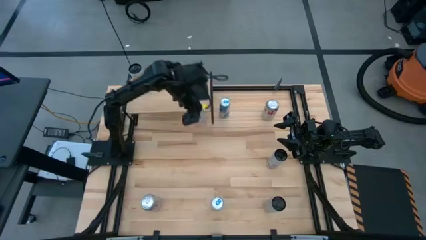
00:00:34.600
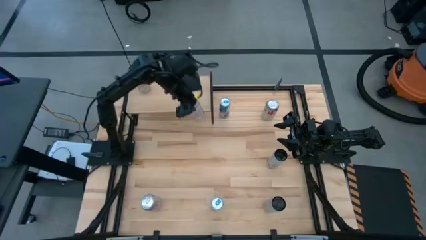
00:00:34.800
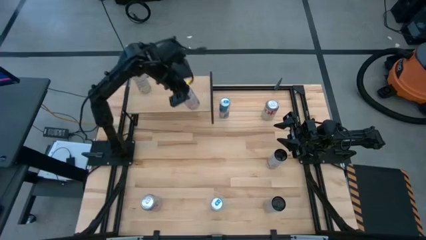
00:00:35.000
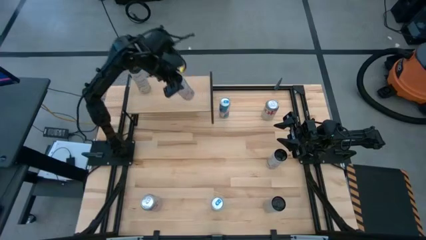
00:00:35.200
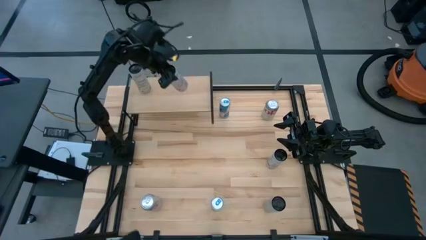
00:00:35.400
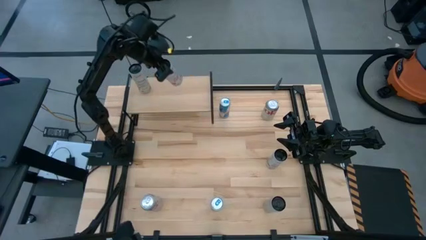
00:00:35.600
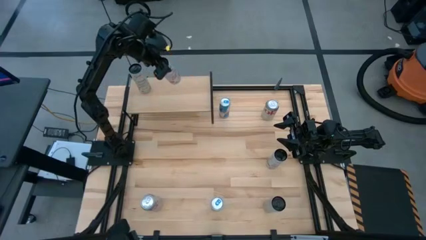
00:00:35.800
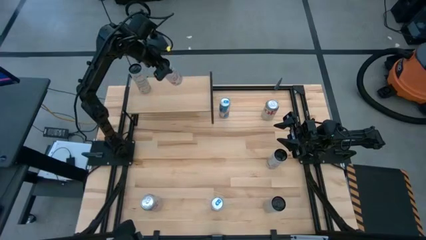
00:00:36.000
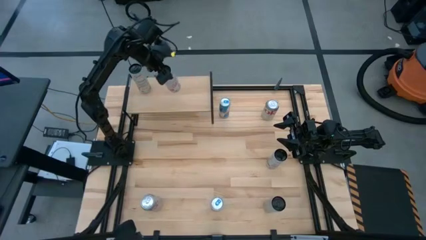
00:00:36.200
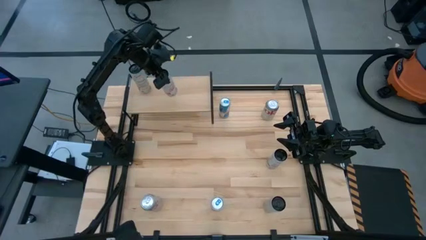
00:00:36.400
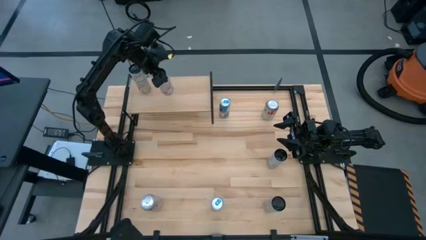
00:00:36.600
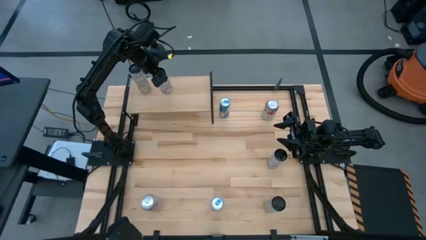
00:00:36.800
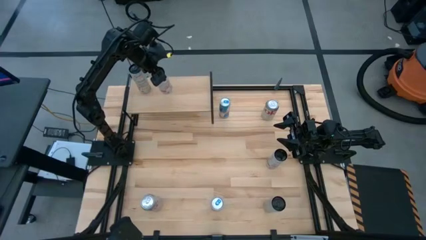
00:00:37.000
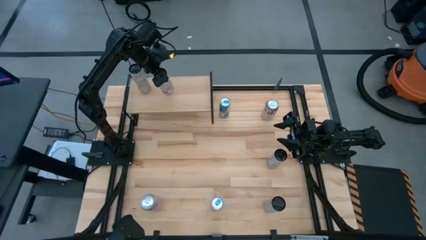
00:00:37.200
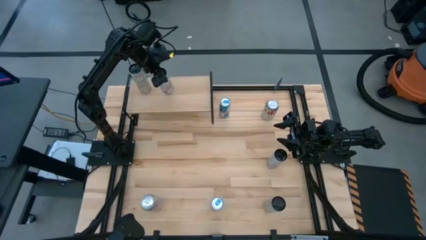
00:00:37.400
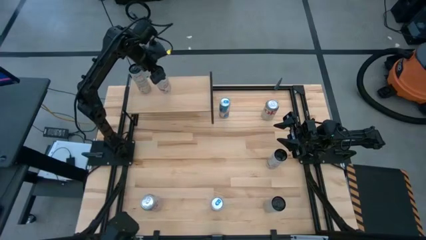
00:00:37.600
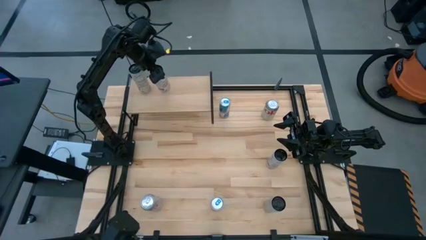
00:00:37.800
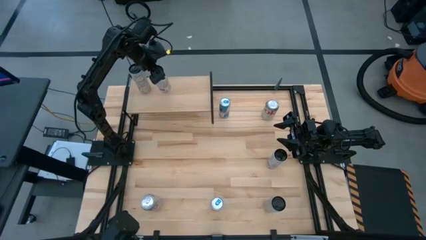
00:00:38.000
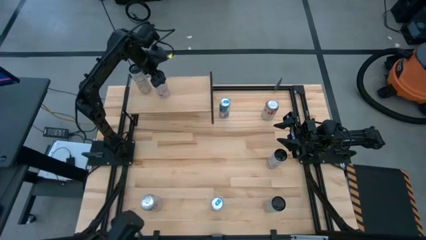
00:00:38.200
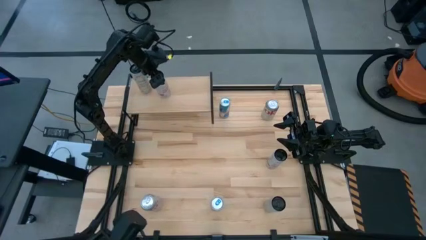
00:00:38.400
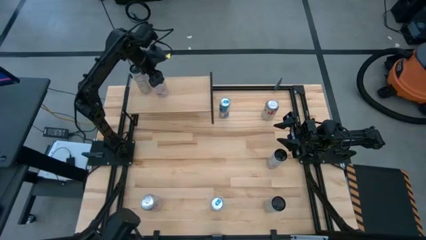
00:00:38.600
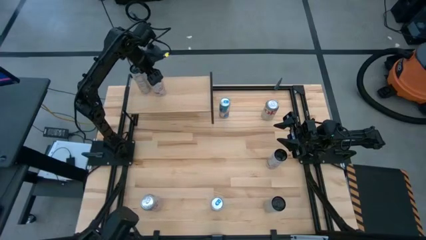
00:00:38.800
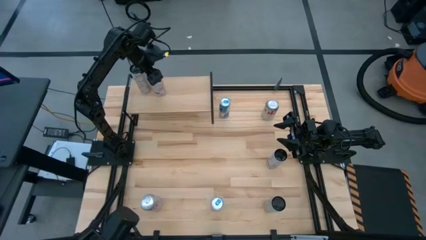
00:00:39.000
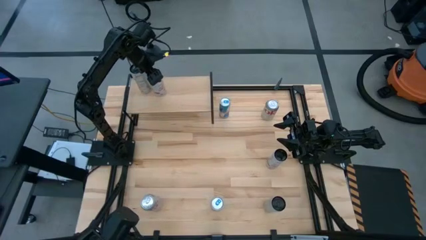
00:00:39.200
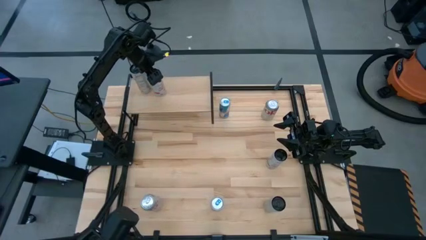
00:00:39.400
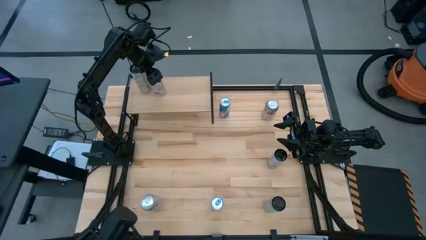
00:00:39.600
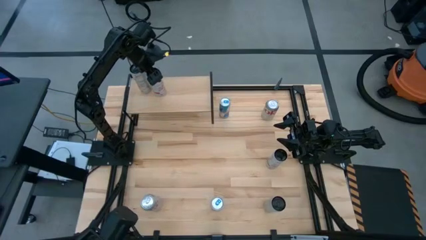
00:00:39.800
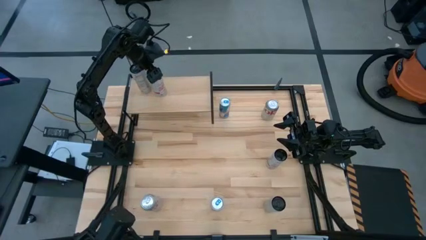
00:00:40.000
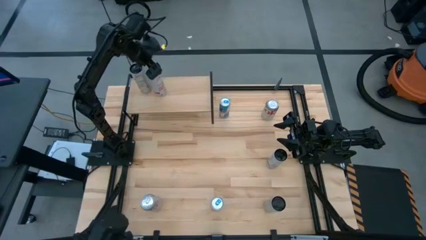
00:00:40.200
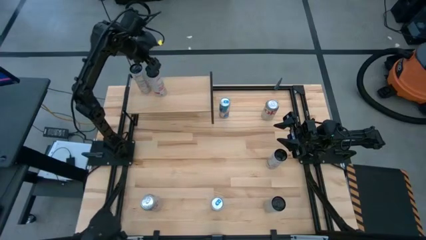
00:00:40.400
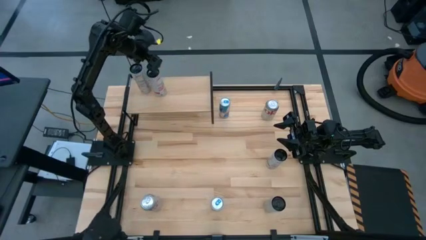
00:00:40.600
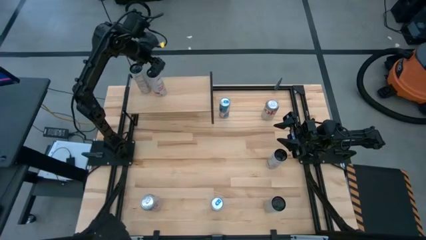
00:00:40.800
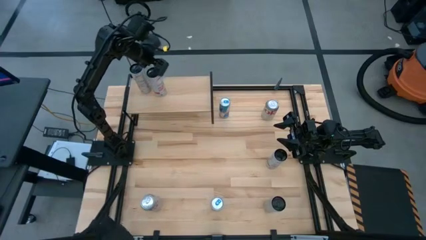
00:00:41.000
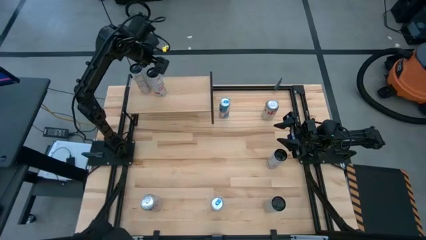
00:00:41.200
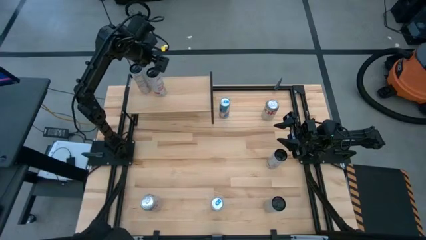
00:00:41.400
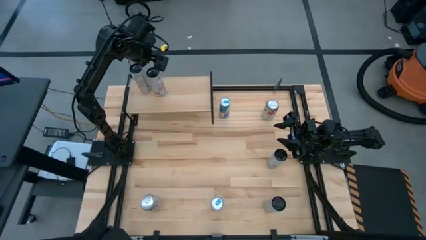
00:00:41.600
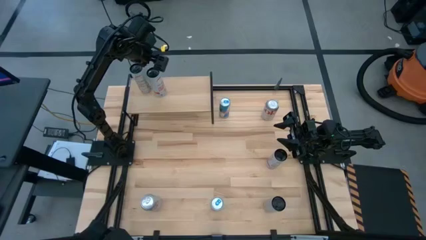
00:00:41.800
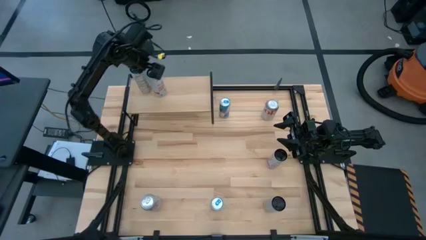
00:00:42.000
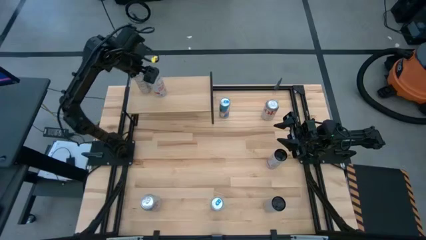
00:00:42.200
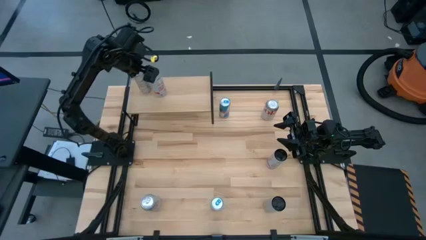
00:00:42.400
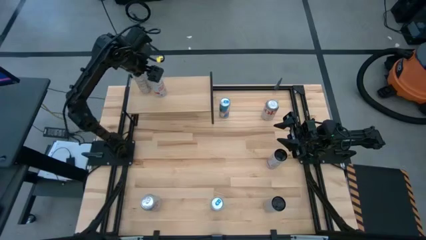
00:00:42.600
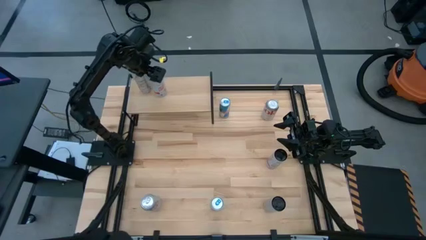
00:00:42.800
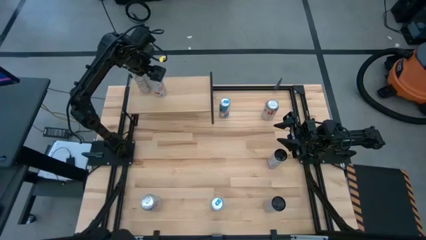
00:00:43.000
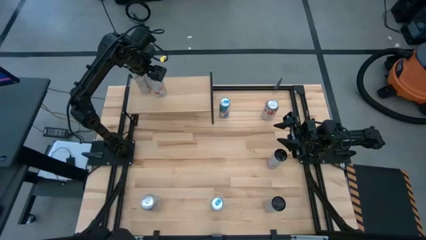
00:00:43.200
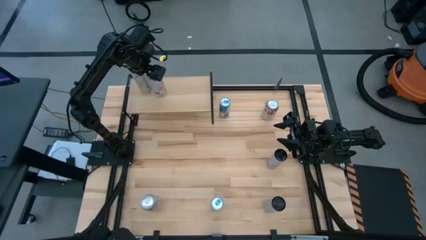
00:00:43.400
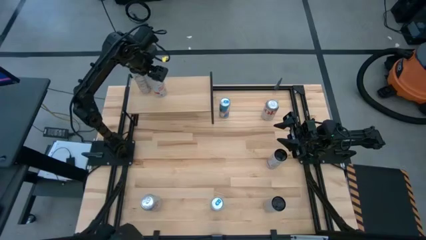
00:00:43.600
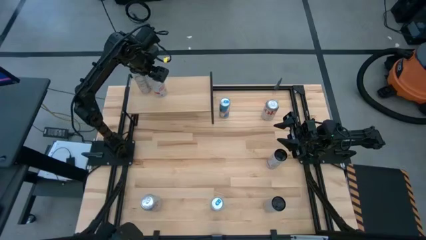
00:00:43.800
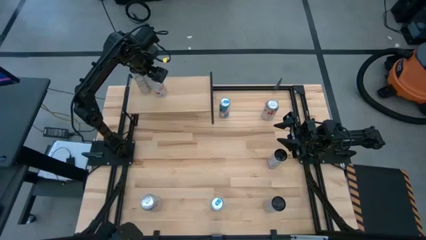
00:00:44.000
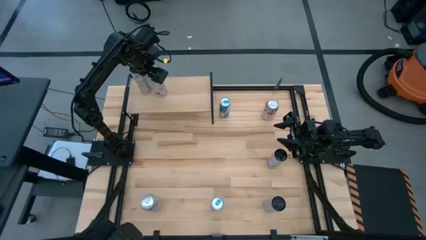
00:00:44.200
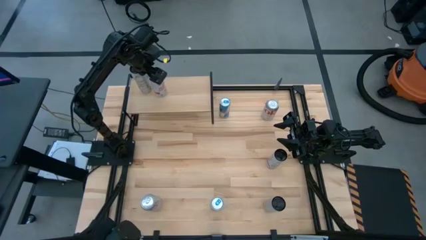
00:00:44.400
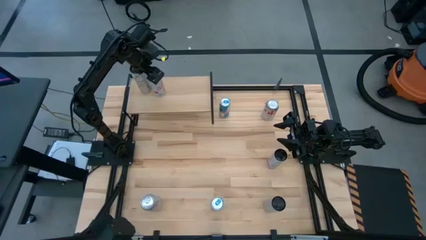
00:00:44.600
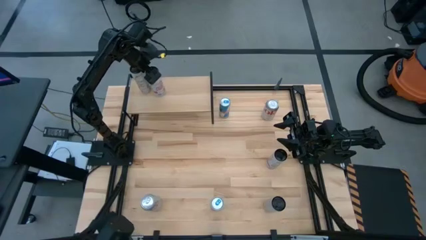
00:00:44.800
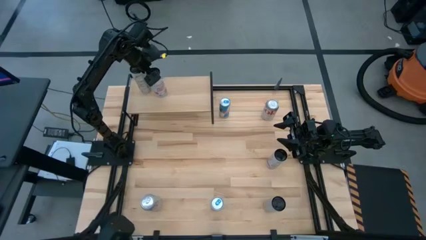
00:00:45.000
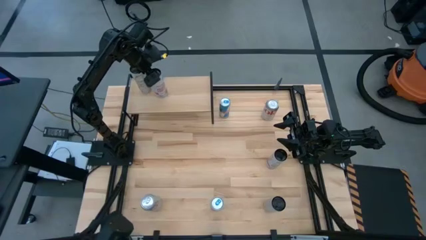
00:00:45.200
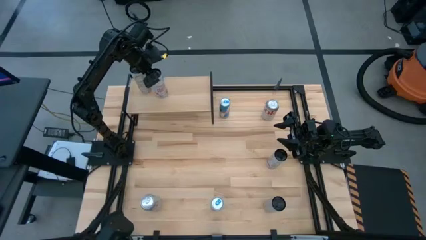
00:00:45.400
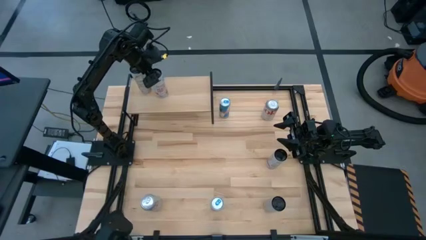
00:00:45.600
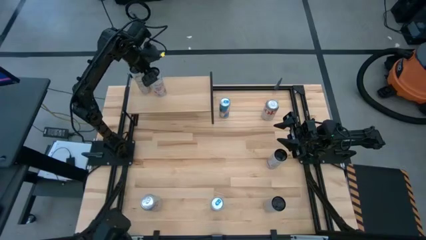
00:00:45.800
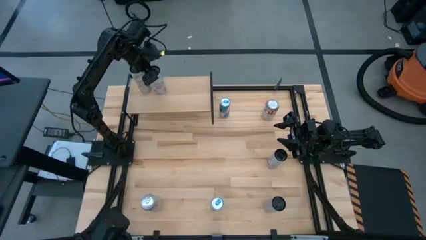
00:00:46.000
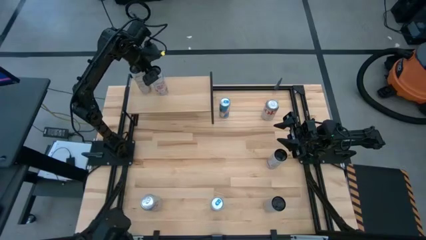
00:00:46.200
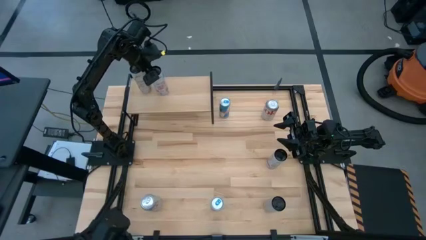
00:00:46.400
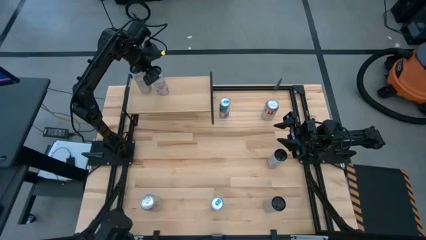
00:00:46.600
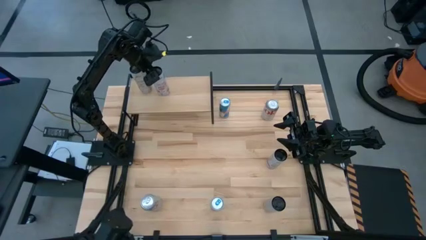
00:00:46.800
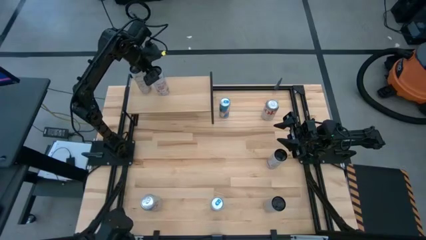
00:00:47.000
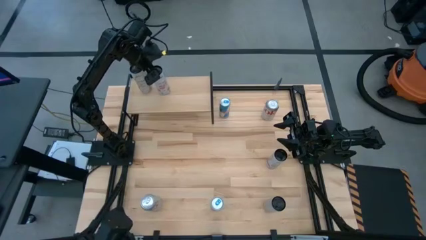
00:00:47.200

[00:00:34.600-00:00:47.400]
Task: Place canned beverage on shelf
Put the left white-pink soda can on the shelf
